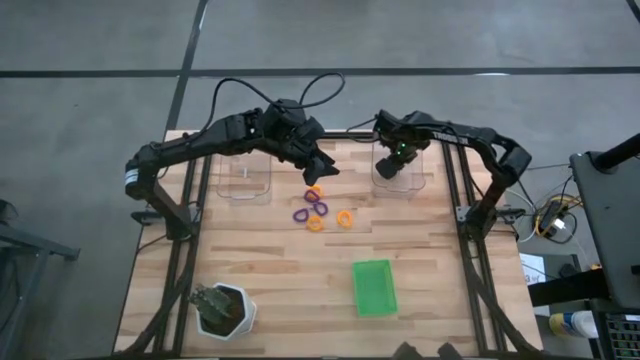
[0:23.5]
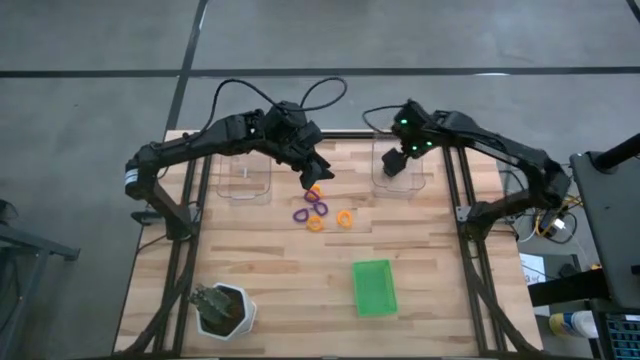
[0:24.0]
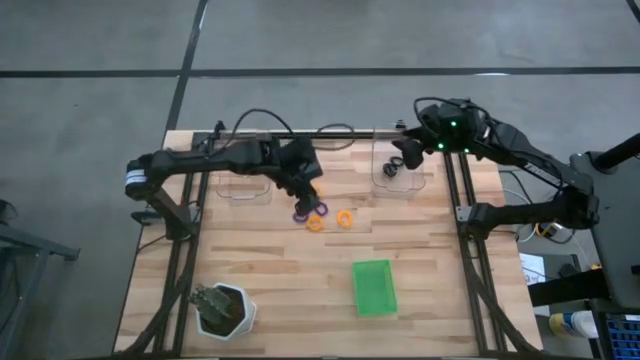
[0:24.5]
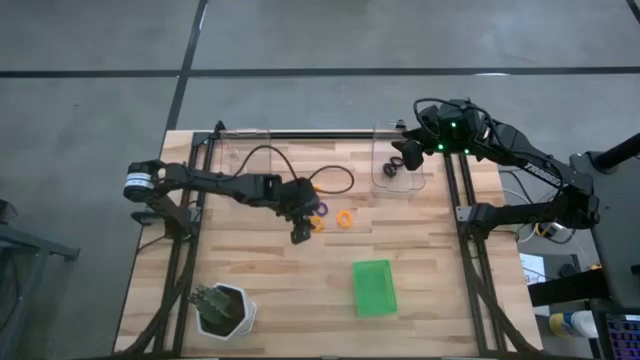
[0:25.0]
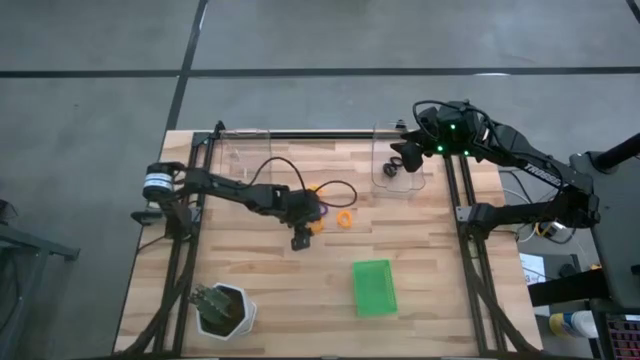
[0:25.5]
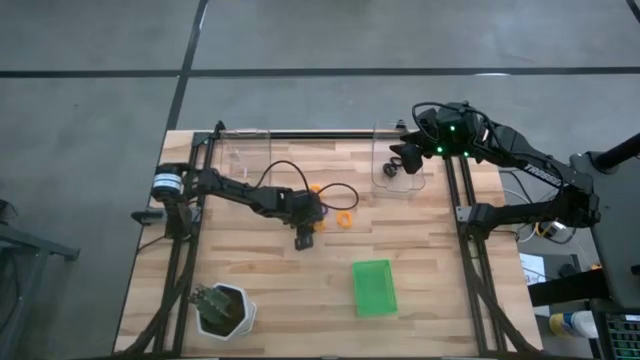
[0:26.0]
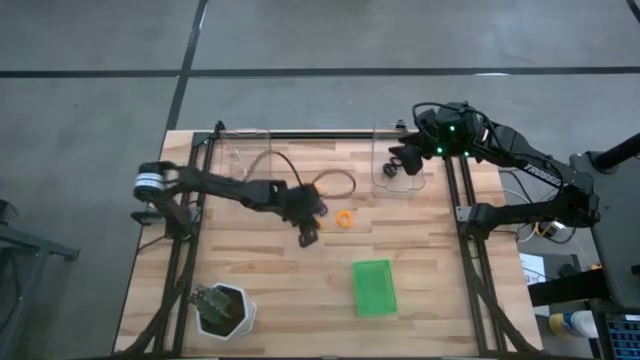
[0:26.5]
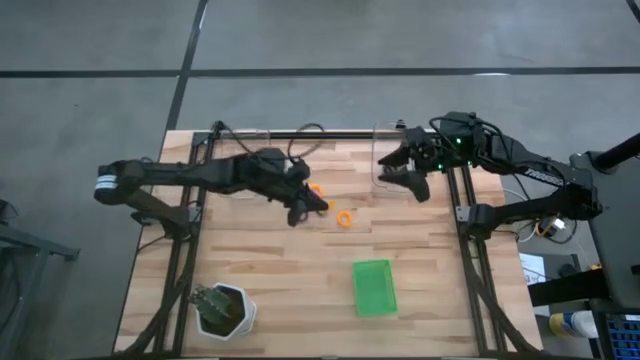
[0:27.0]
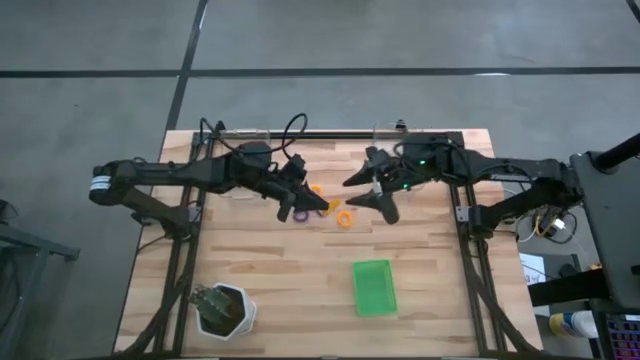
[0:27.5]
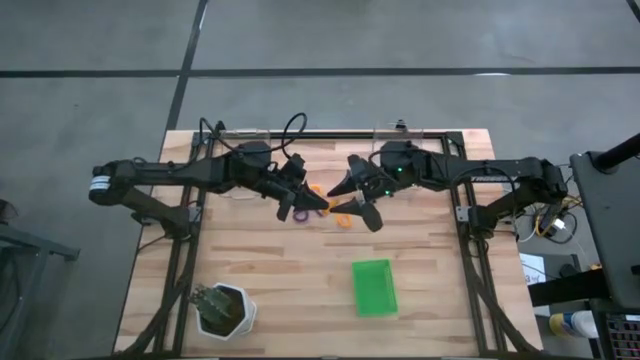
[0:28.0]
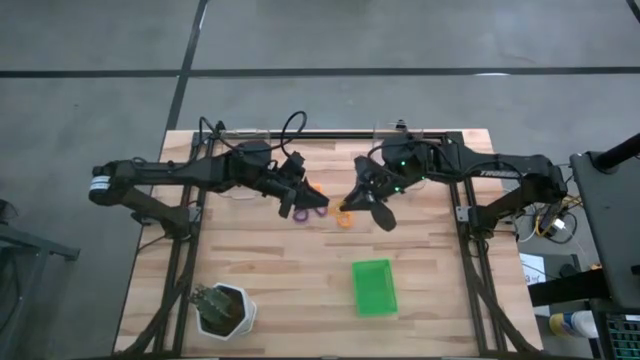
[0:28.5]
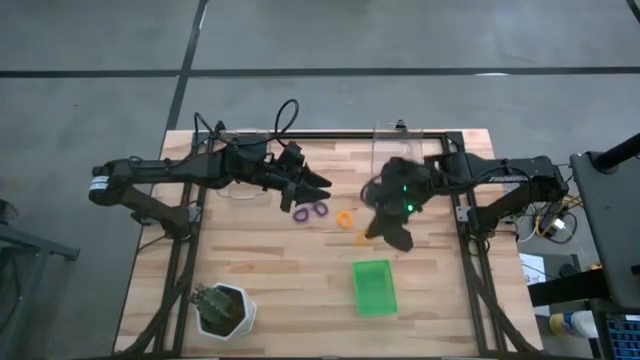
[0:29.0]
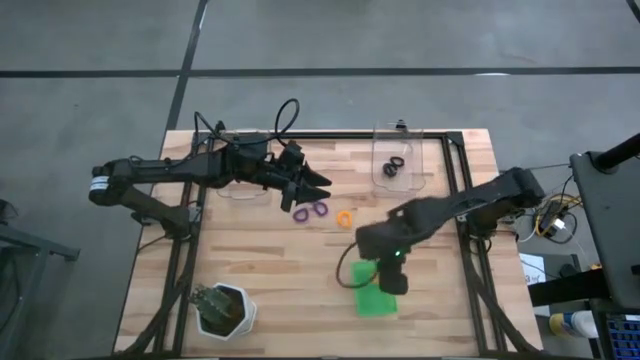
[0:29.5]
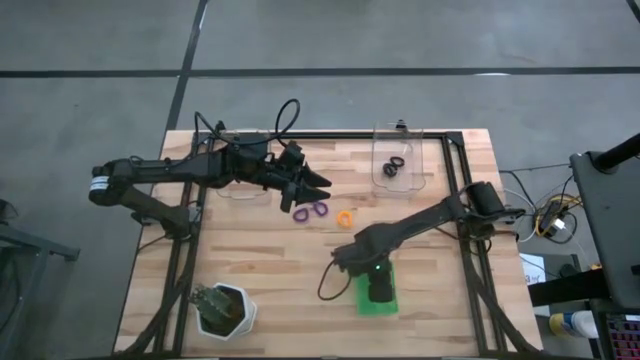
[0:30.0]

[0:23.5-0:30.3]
Task: Sort spring keychains
Put the bottom left yellow spring keychain into the green bin

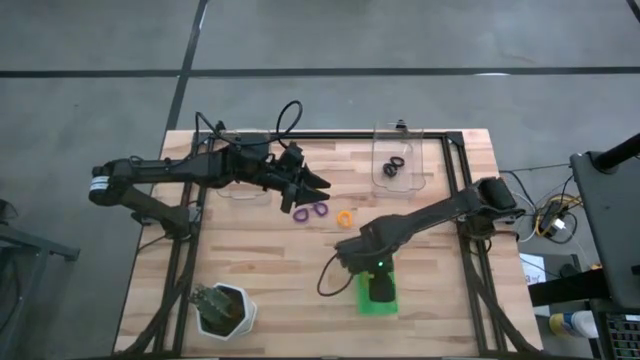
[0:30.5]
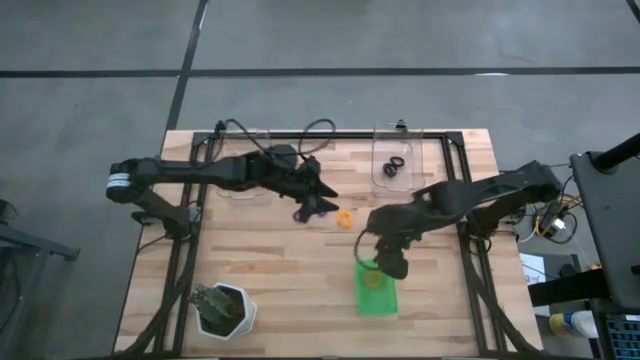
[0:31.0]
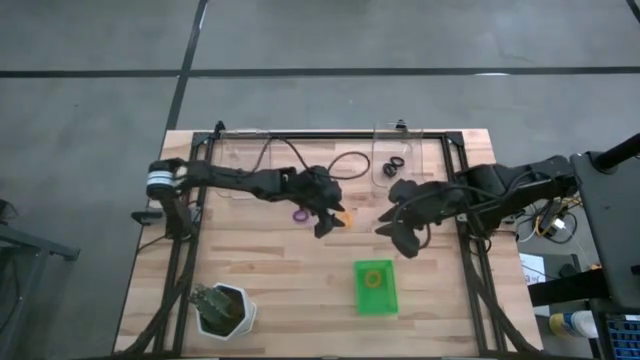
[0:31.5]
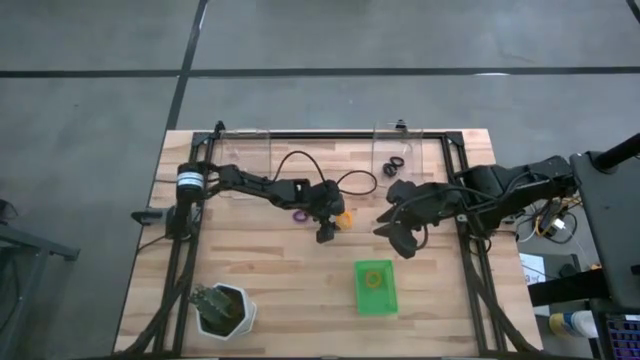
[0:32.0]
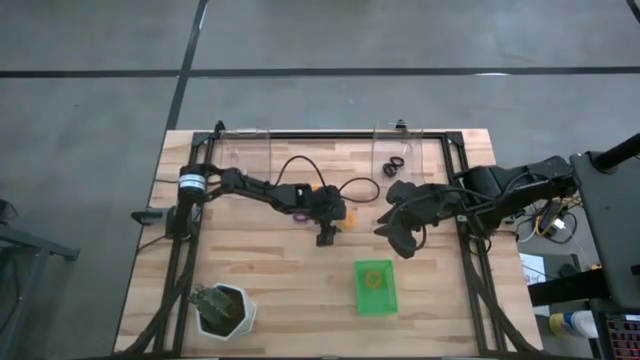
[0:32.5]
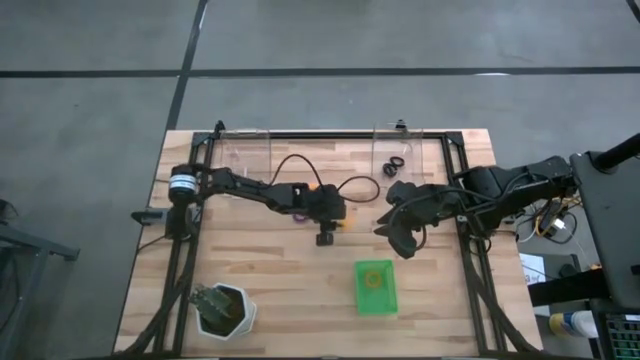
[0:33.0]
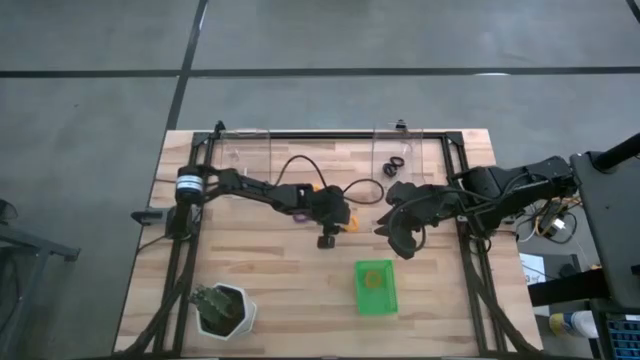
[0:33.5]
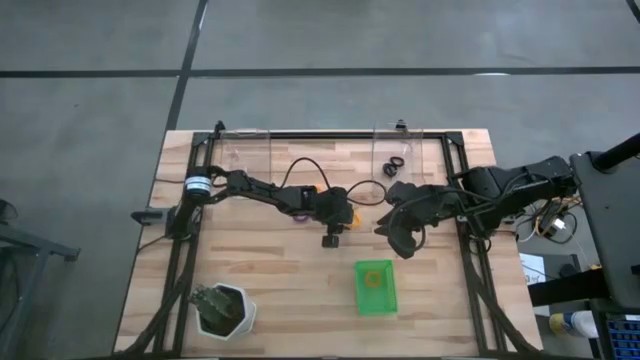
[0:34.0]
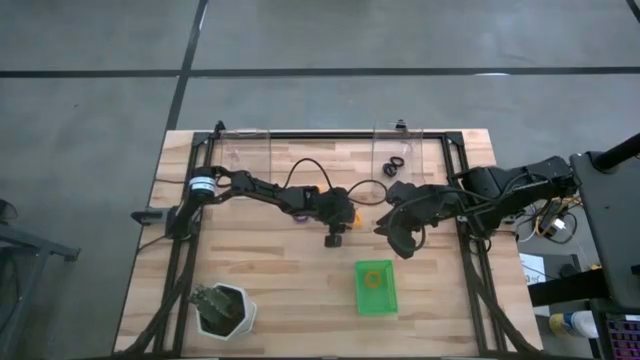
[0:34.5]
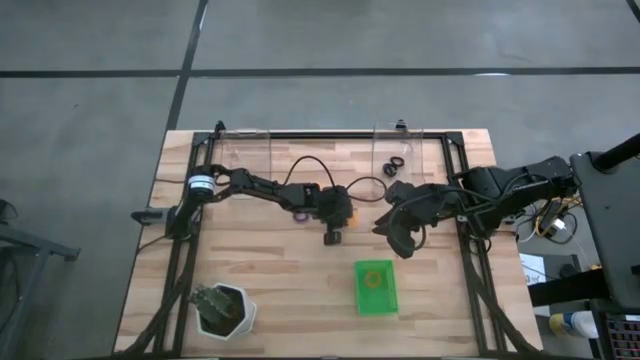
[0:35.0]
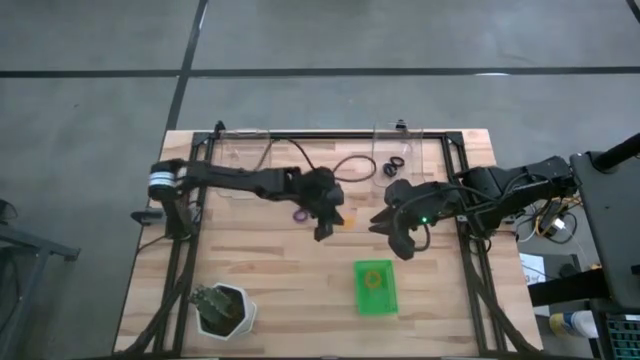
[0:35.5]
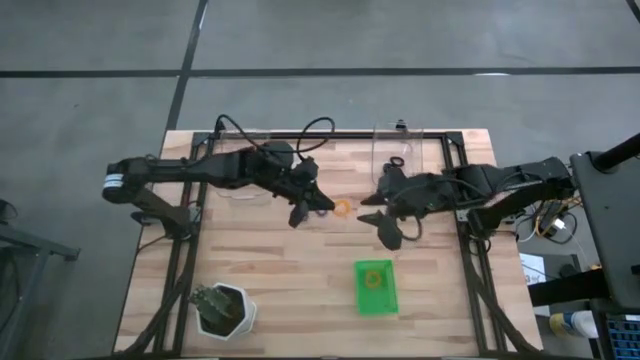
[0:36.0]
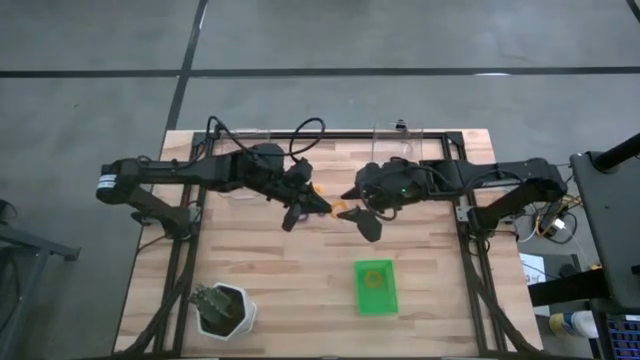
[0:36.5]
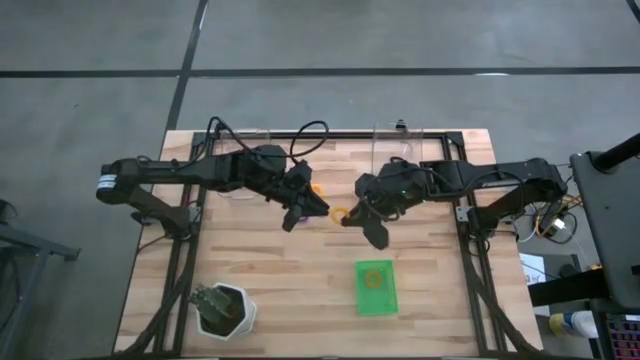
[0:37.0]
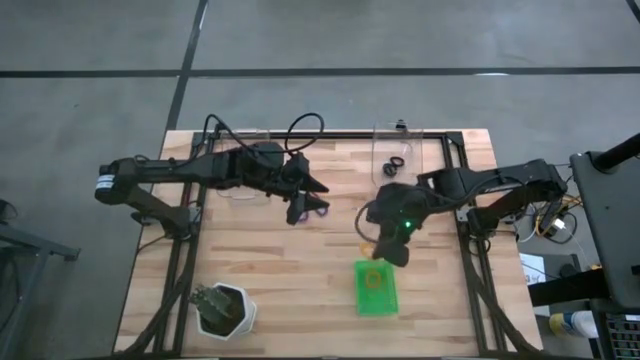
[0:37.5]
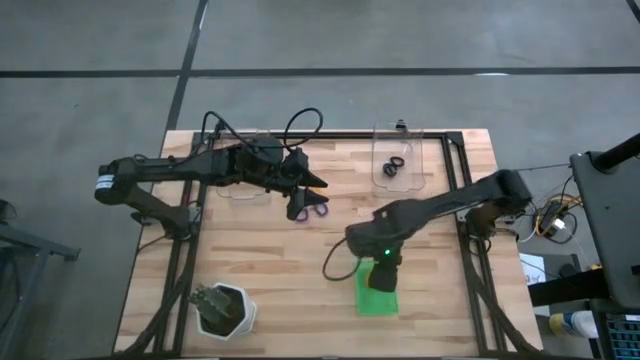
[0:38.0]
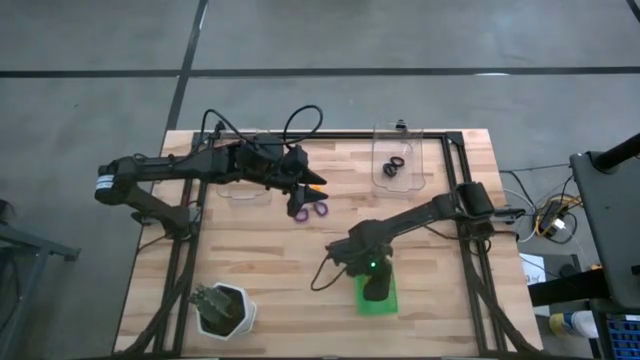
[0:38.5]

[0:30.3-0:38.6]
Put the bottom yellow spring keychain into the green bin

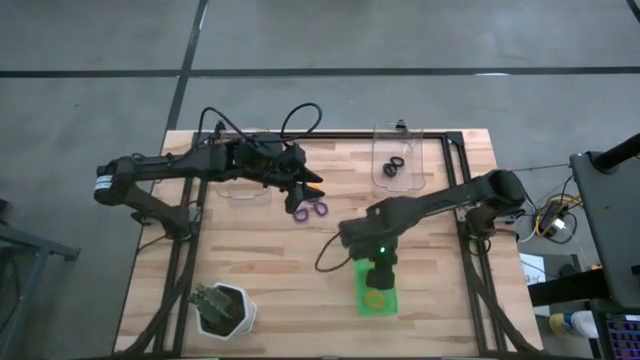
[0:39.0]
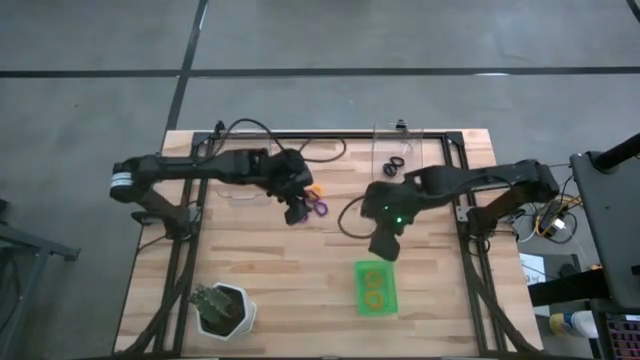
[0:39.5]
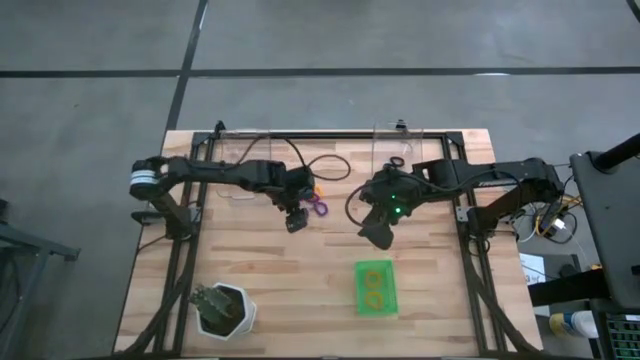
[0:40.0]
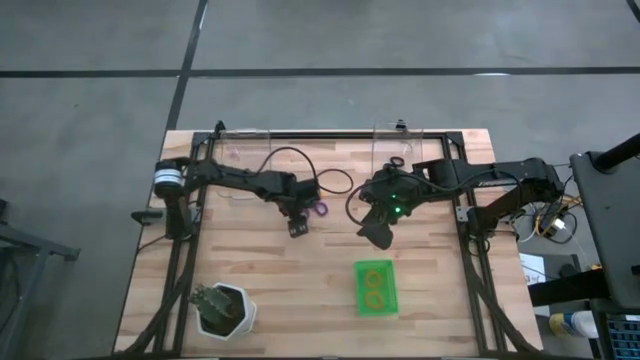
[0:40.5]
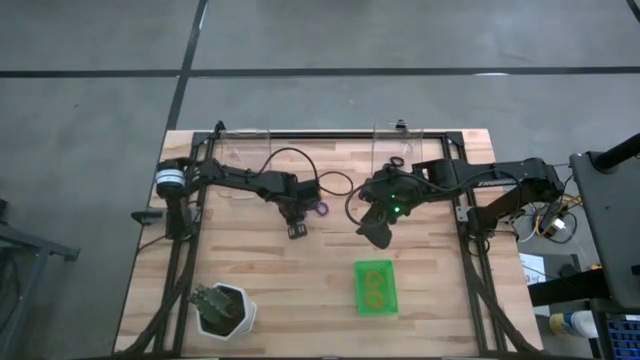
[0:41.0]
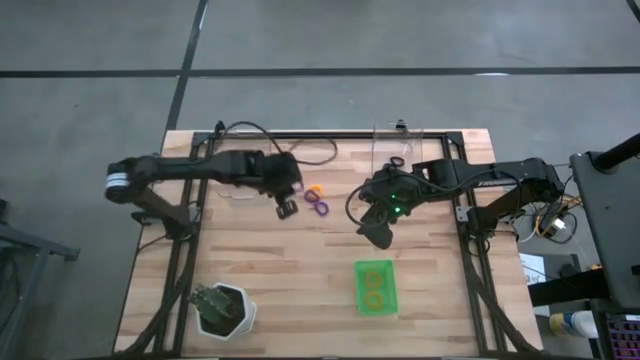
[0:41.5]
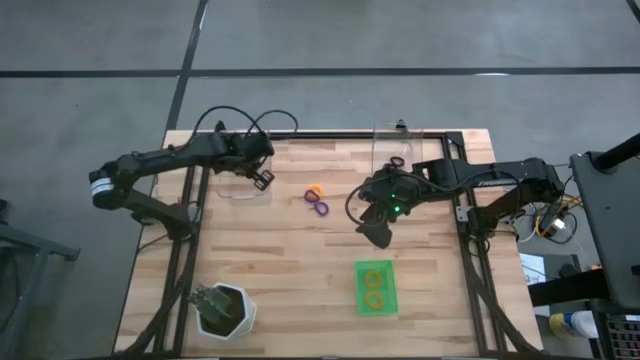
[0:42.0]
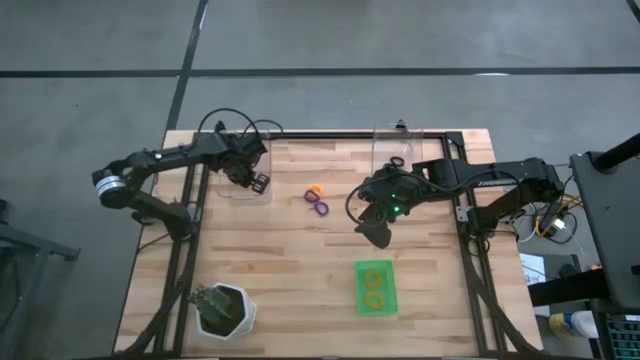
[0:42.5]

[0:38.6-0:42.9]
Put the bottom left purple spring keychain into the left transparent bin

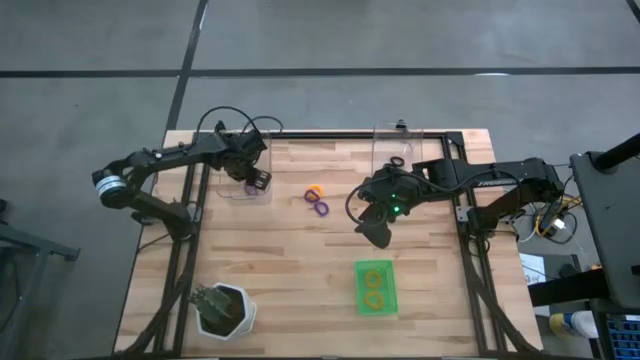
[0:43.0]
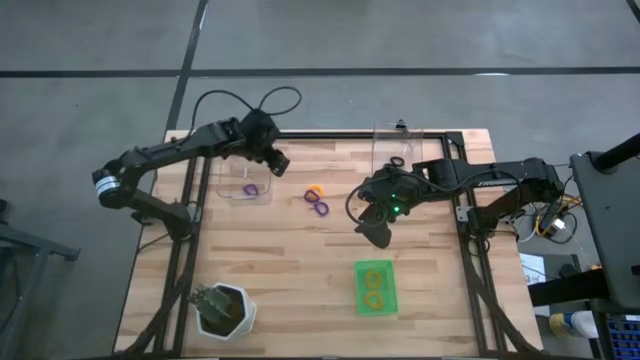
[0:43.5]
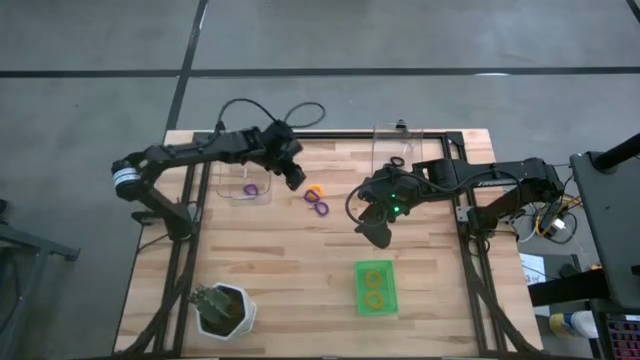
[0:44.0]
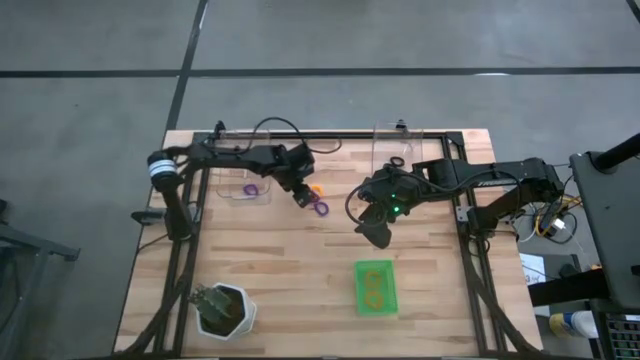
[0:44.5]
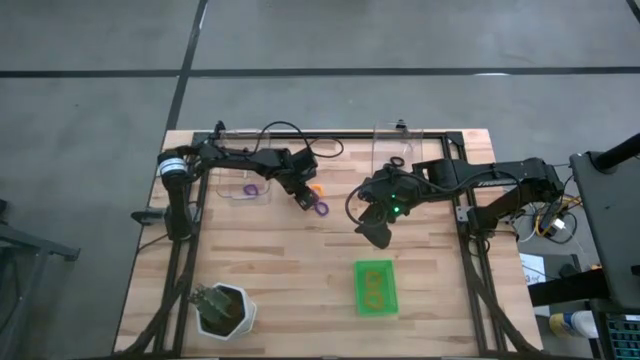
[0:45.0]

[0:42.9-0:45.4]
Put the top purple spring keychain into the left transparent bin

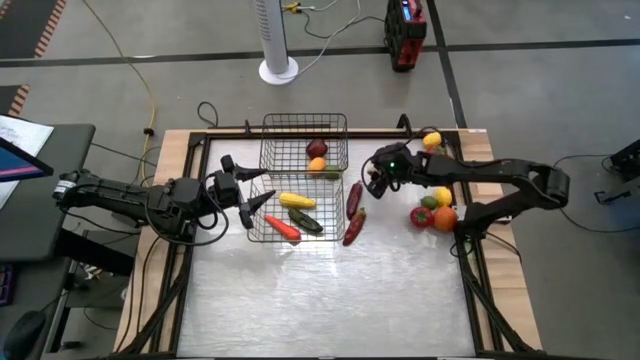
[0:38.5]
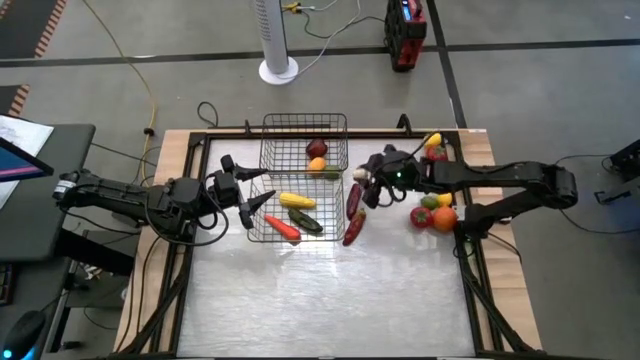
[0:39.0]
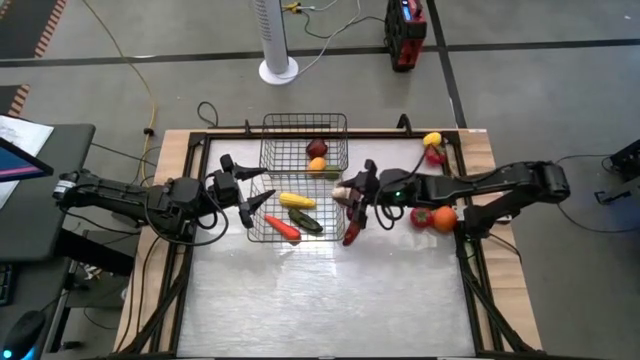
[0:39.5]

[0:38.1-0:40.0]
Task: Sort produce into baskets
Put the garlic into the bottom wire basket
